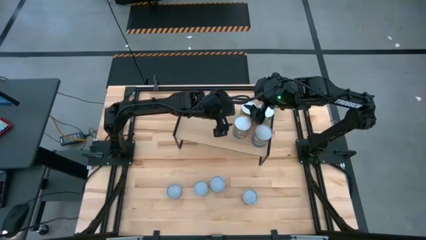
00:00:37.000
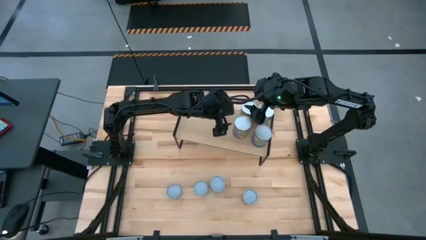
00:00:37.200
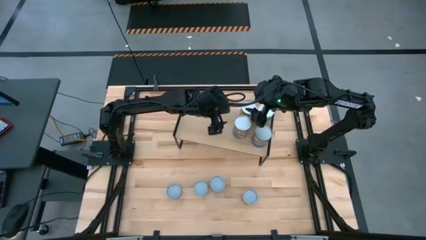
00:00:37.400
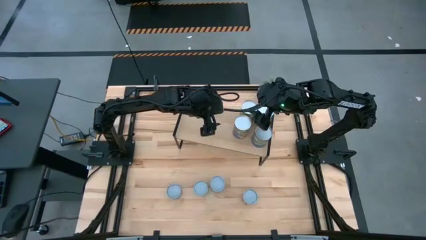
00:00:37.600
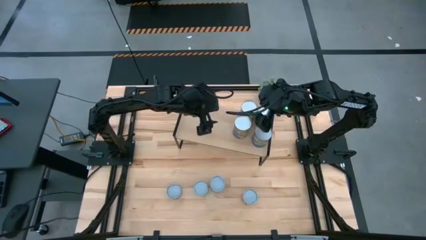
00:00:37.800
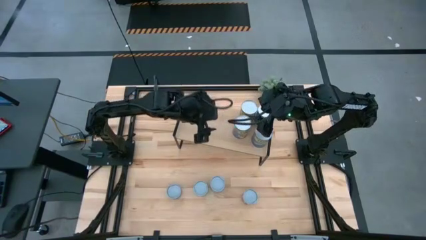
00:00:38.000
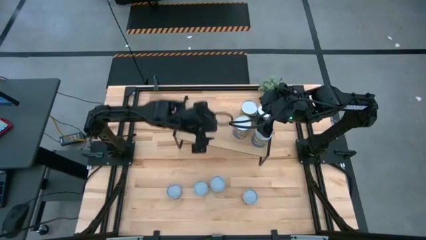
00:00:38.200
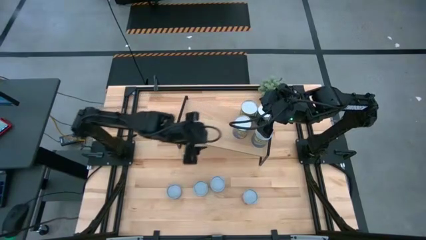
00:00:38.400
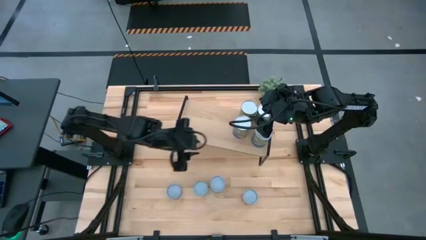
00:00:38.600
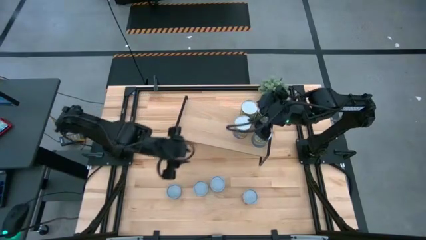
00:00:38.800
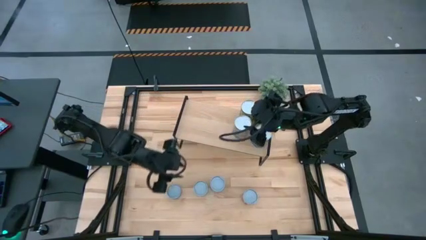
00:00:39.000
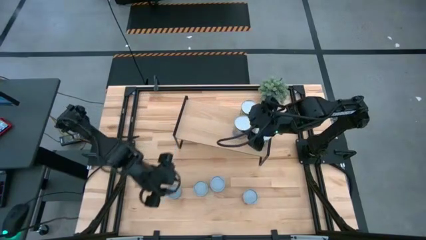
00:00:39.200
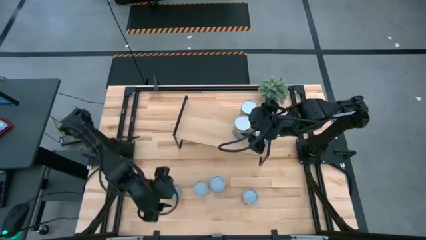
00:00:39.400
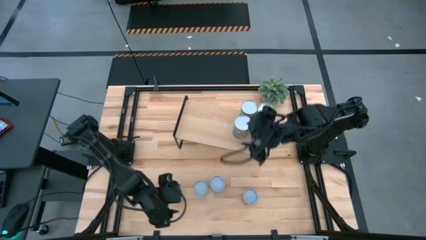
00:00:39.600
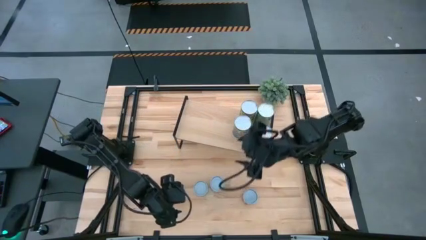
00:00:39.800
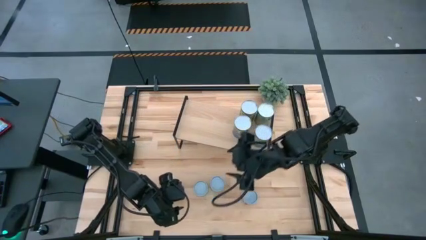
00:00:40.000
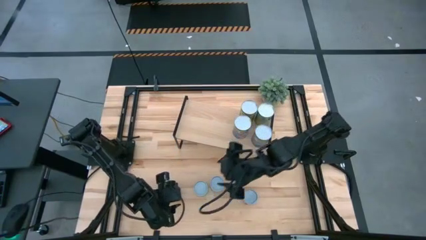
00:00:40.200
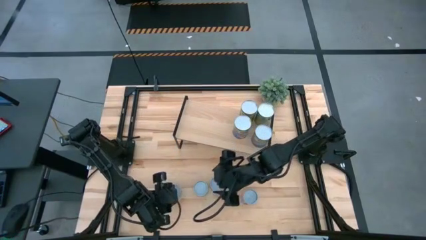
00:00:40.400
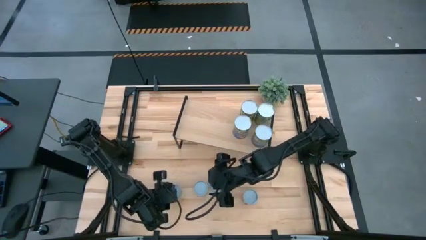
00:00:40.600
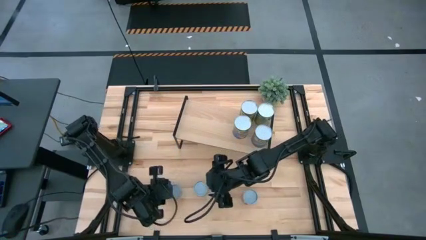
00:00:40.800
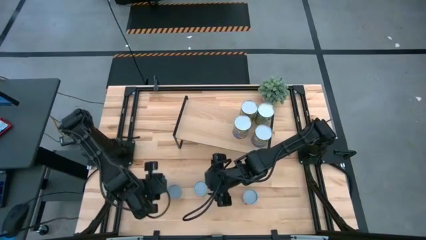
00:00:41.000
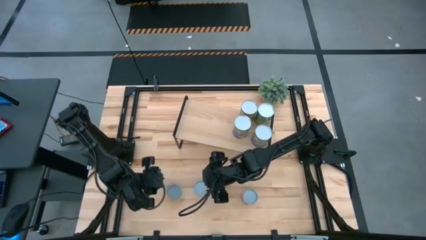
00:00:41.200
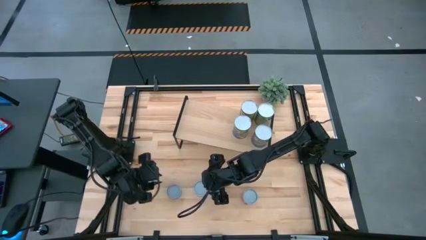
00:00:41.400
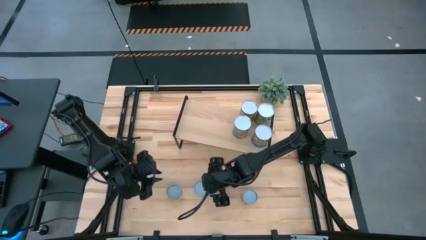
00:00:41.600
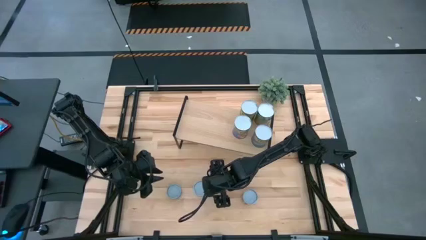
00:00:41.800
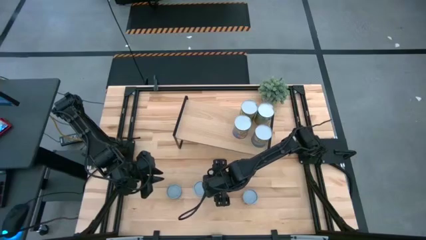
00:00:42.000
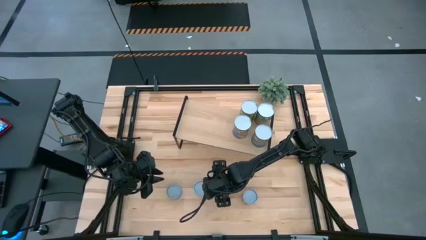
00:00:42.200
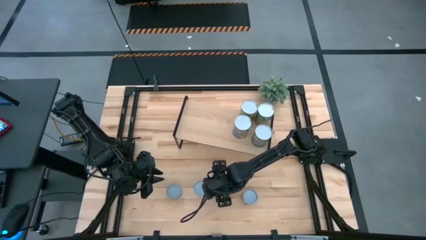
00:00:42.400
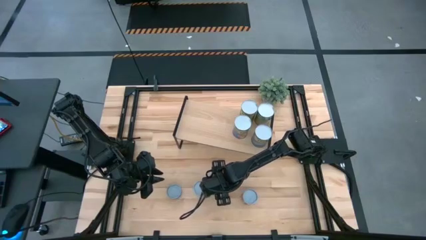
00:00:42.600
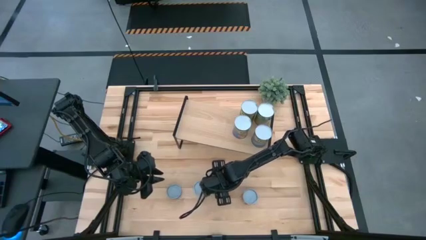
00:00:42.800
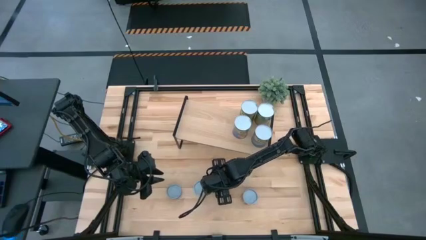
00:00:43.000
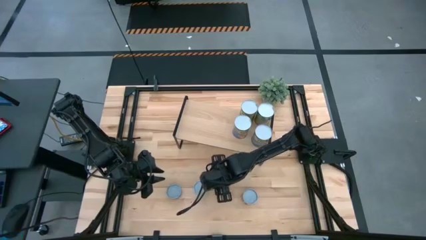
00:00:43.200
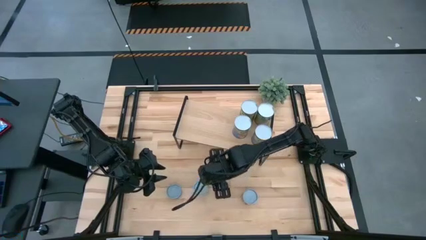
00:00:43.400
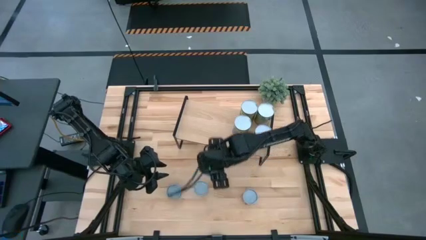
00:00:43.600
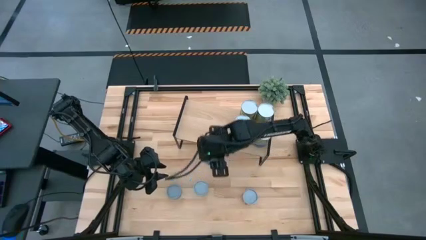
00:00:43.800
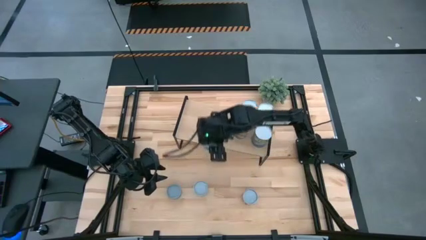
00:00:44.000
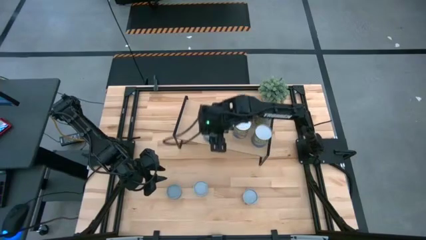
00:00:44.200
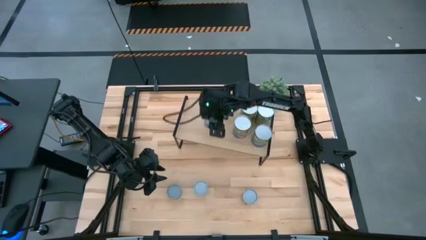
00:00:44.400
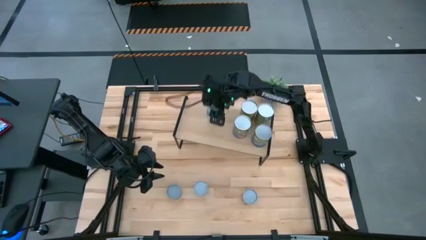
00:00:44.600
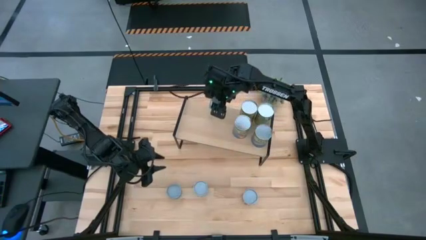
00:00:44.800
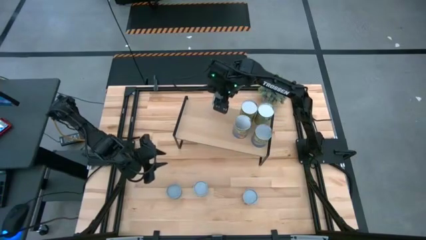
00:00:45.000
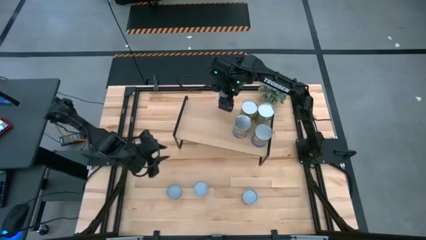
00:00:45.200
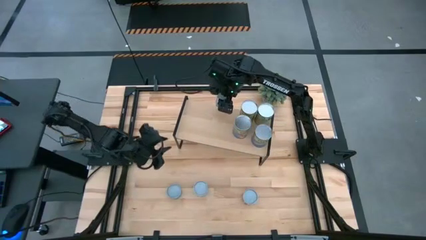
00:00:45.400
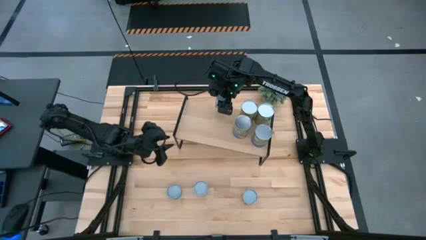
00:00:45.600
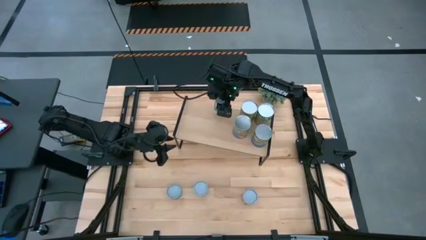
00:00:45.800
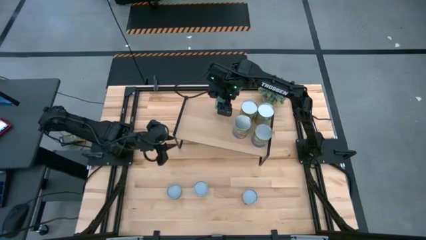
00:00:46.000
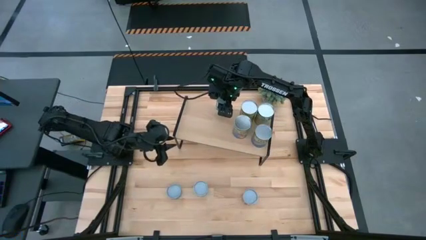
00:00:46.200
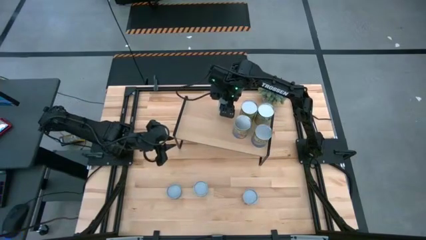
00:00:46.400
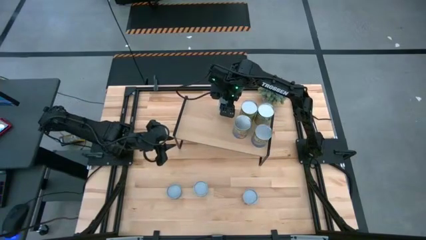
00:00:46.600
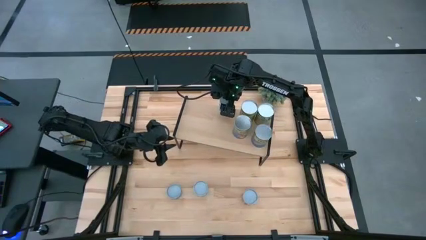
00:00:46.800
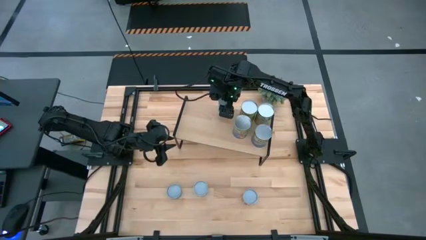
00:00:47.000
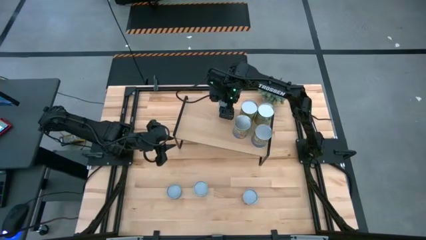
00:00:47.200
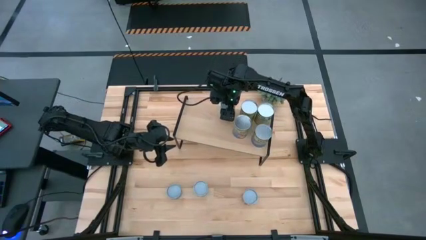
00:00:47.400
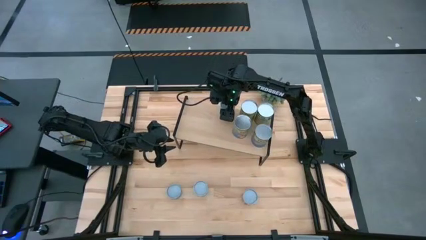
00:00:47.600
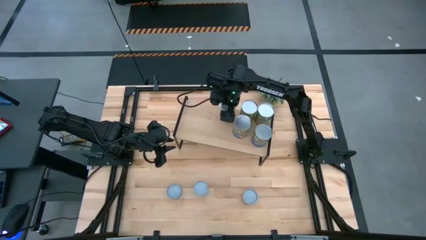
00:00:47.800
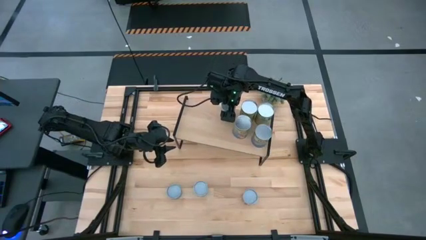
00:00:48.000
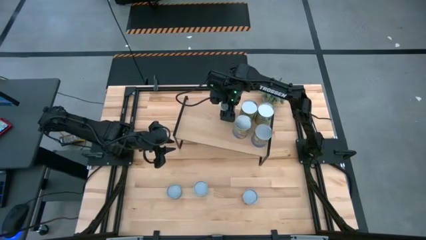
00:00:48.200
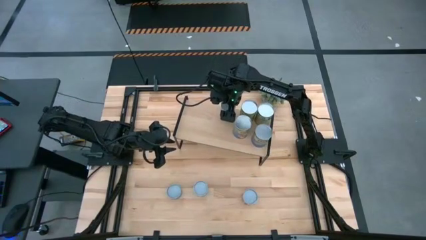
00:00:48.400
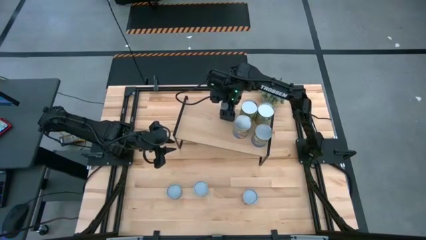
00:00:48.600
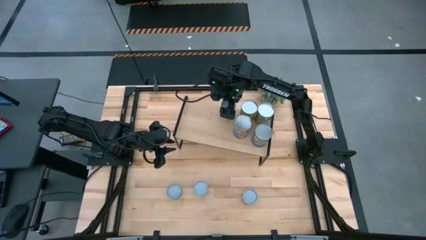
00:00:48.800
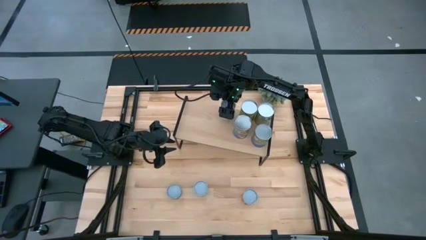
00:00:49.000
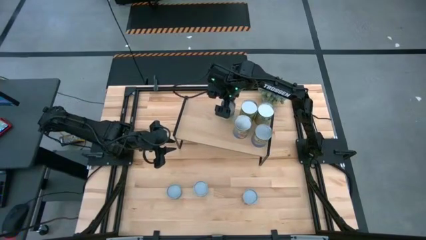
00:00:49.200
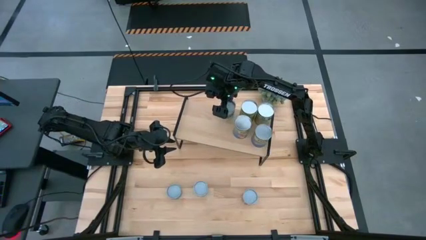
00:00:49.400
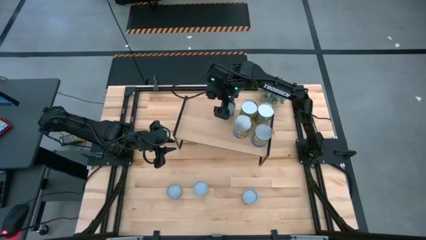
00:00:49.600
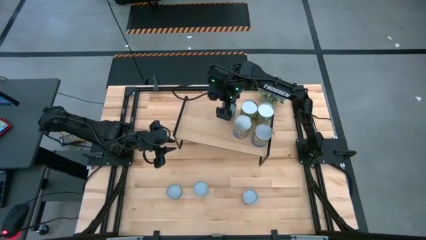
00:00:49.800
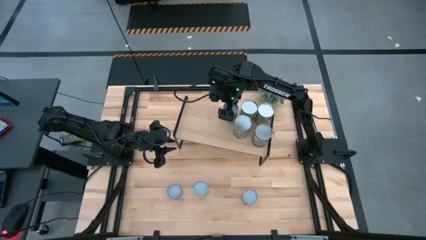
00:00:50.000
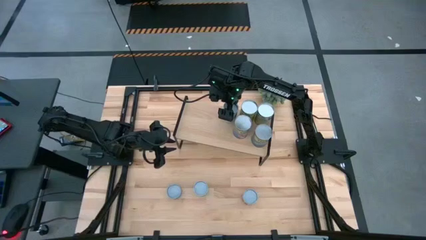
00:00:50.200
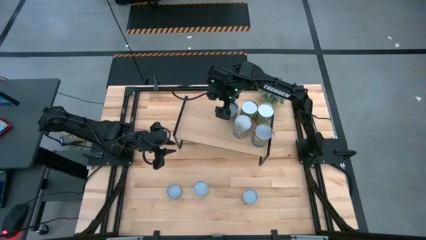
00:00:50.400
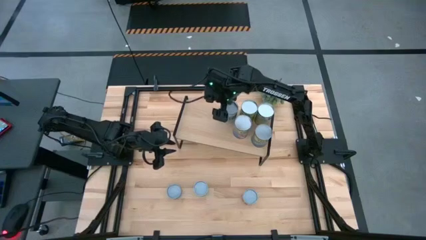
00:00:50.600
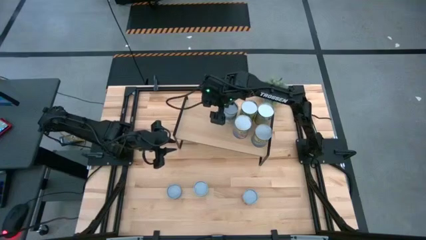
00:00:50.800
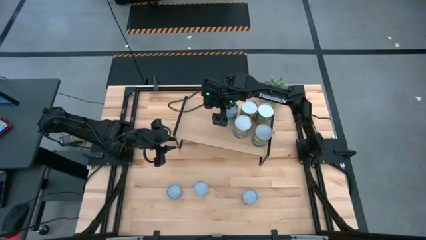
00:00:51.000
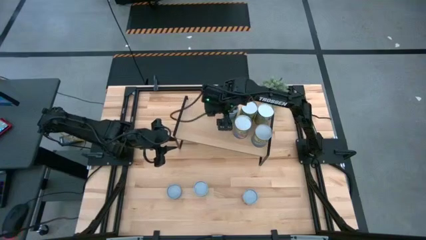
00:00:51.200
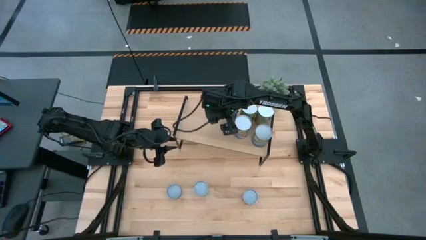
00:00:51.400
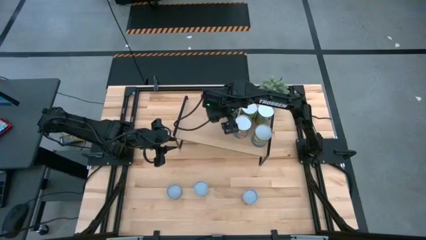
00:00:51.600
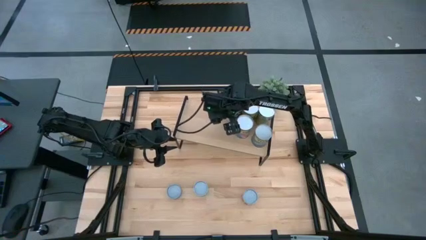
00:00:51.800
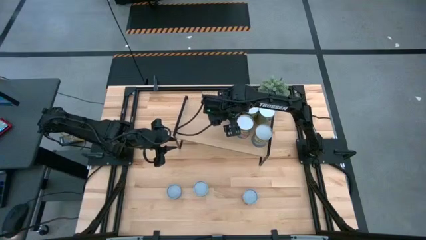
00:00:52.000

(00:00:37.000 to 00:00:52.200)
Task: Pick and place cans onto a shelf
Put the canned mixed vegetables on the shelf

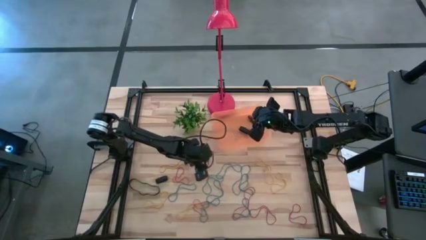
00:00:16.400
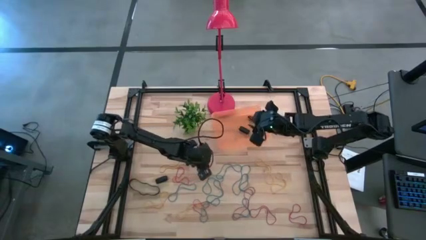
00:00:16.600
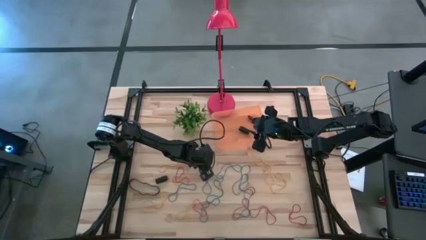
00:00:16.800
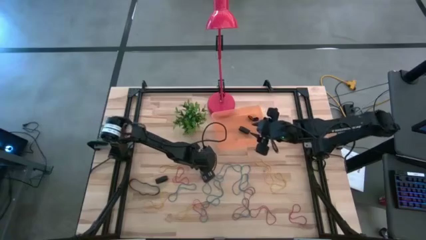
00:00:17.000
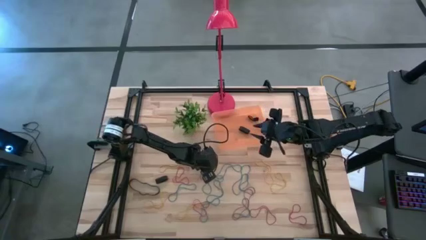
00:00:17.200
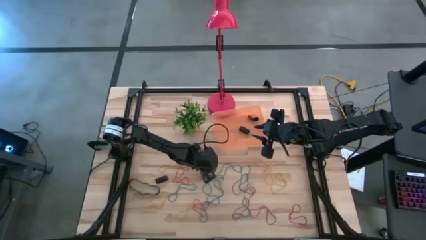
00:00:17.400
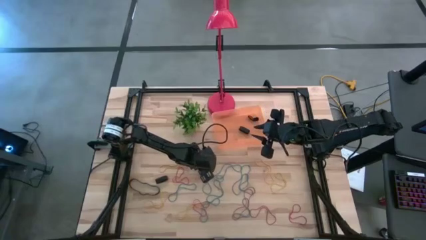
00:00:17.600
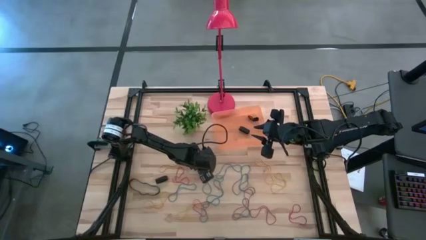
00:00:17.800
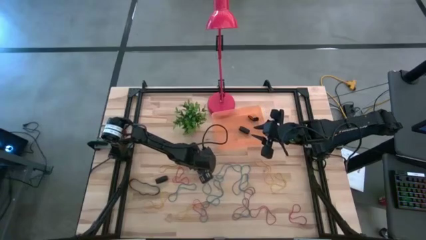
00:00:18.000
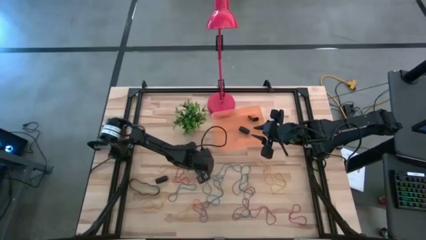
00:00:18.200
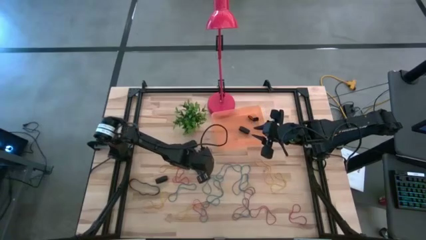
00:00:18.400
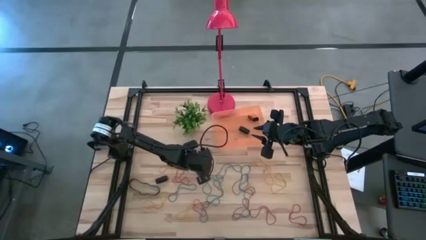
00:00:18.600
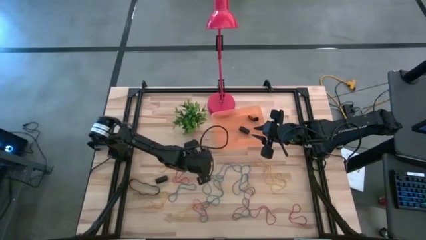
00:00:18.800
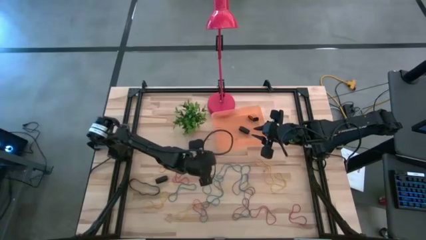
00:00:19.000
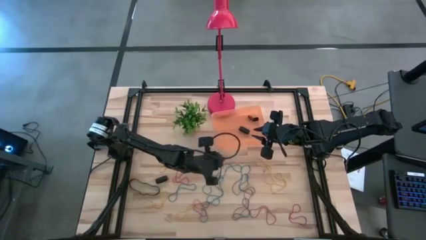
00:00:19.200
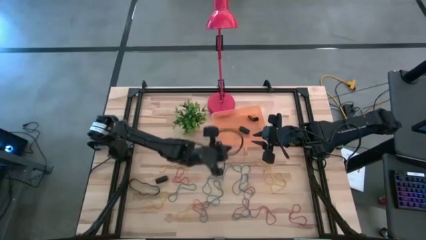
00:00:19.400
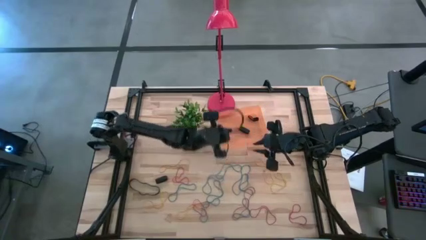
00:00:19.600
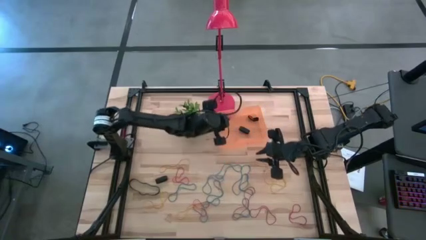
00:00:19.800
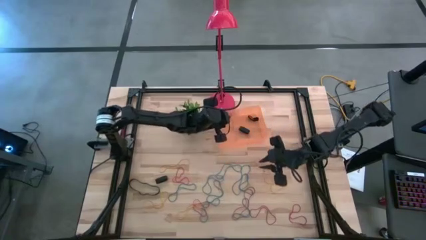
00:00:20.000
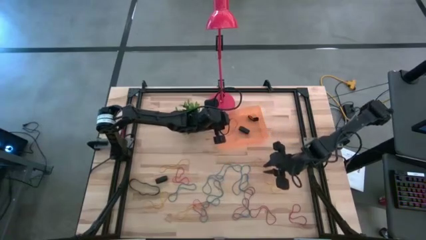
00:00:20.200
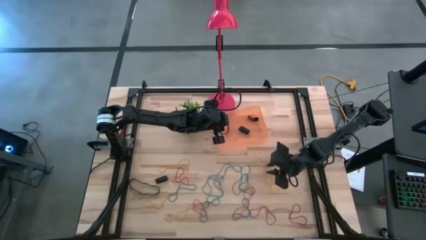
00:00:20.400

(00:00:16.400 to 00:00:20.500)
Task: Pick and place rubber bands into bin
Put the red rubberband into the orange container
